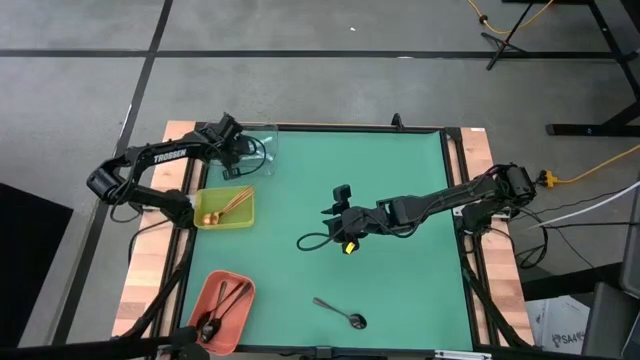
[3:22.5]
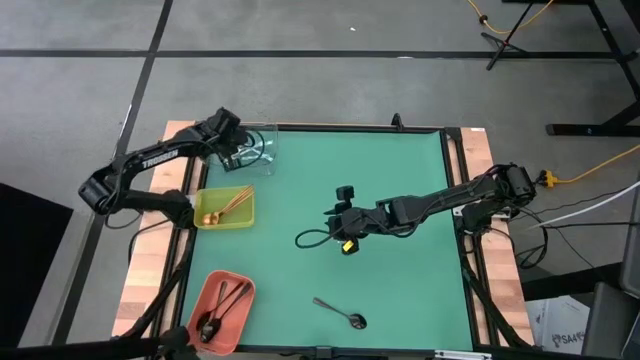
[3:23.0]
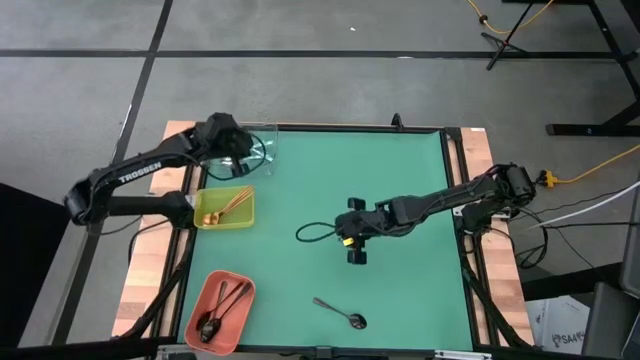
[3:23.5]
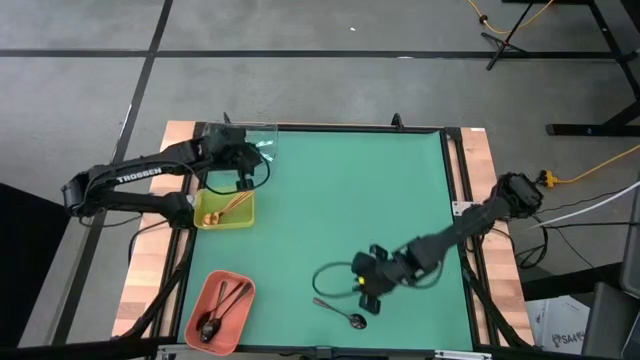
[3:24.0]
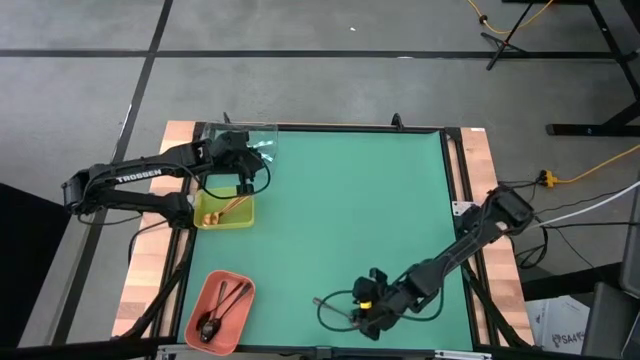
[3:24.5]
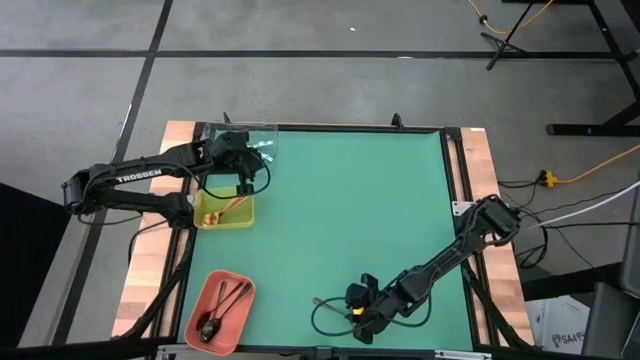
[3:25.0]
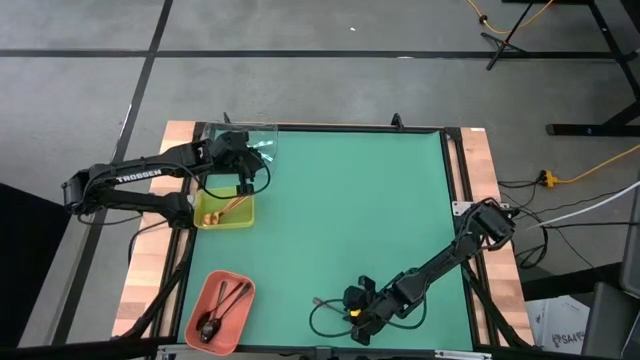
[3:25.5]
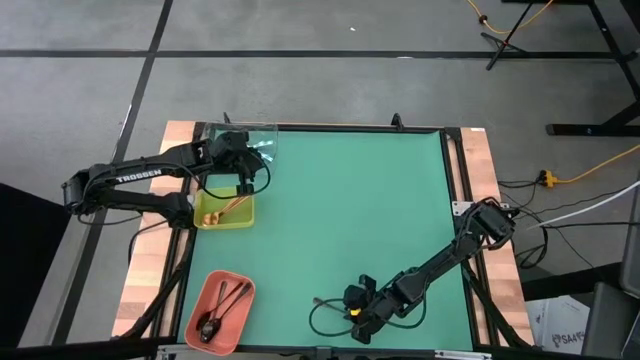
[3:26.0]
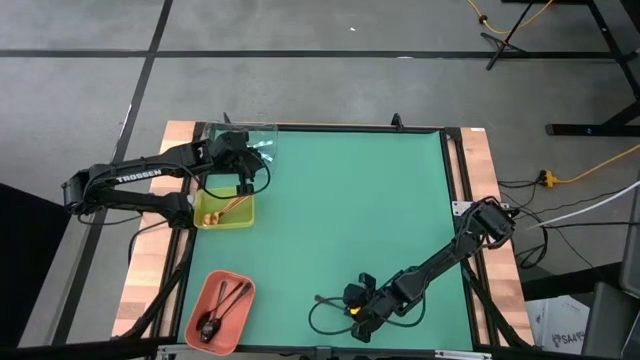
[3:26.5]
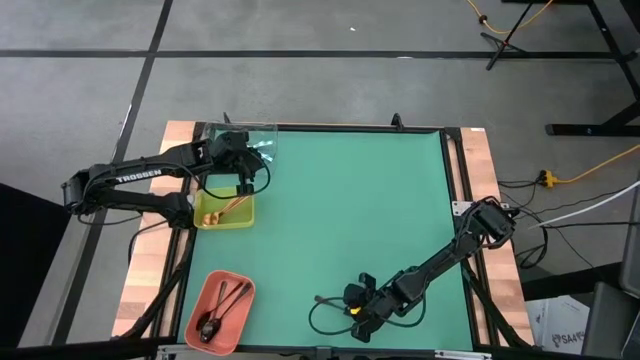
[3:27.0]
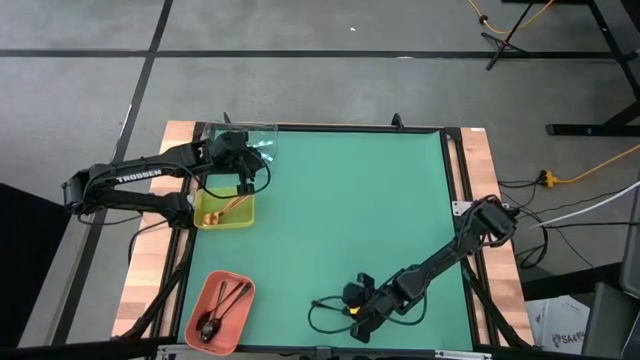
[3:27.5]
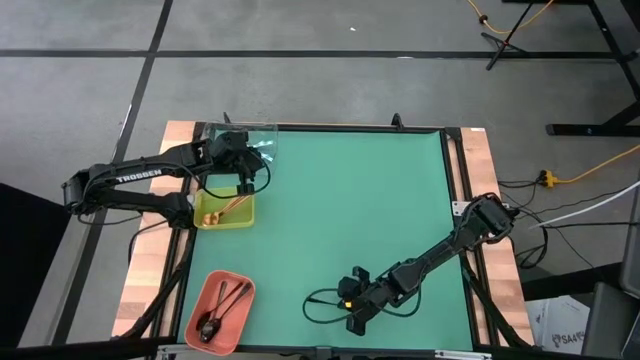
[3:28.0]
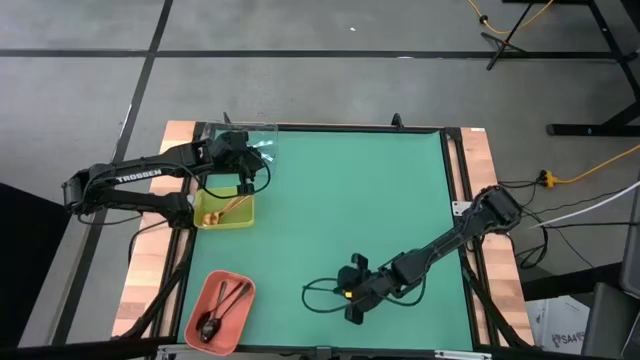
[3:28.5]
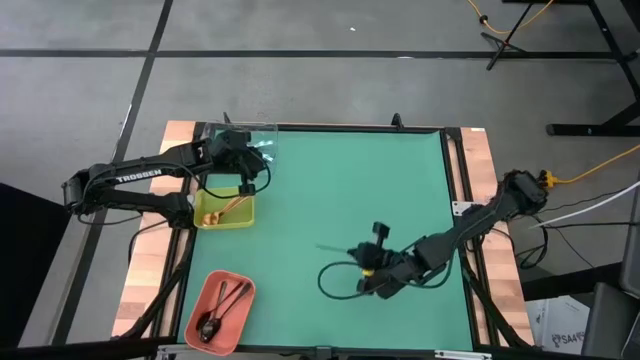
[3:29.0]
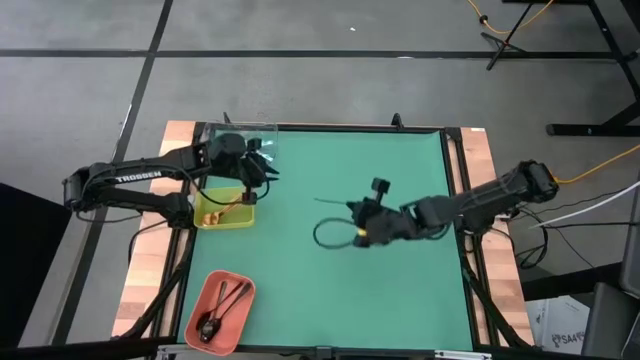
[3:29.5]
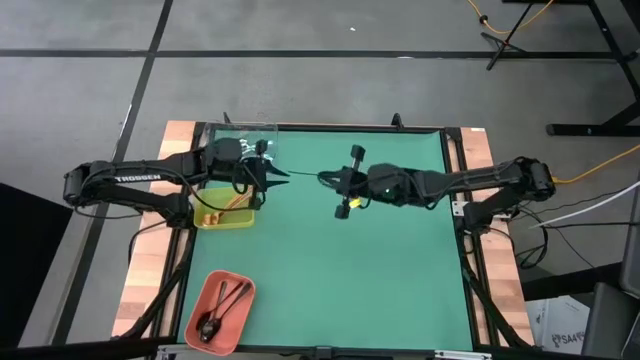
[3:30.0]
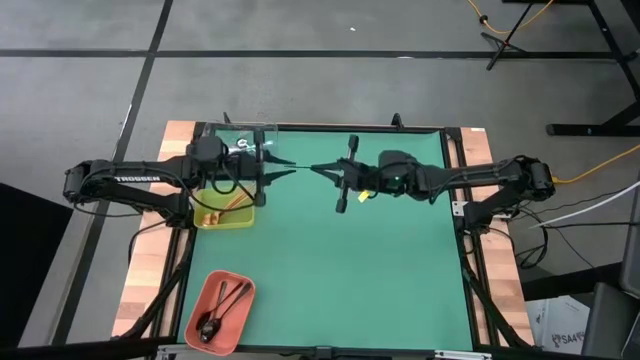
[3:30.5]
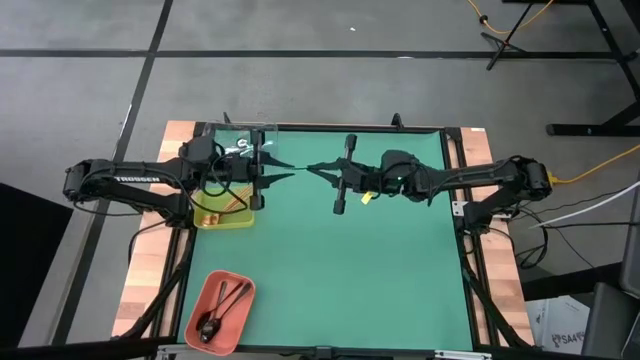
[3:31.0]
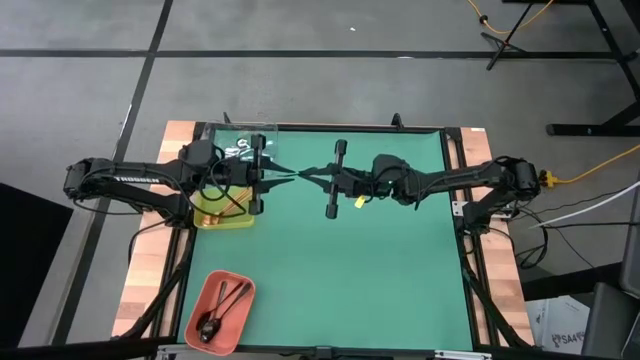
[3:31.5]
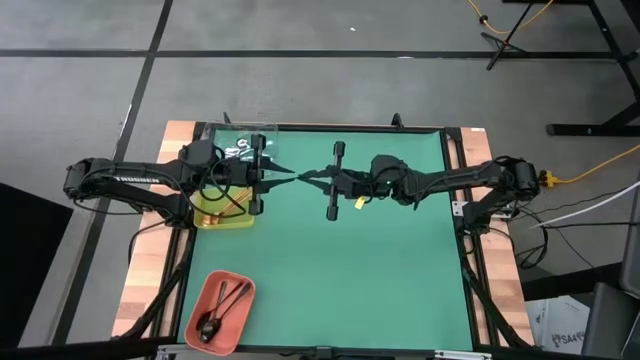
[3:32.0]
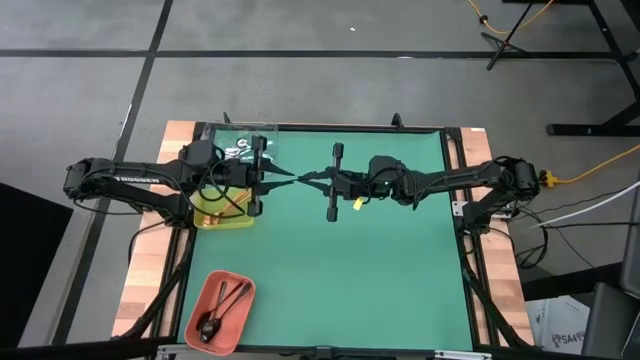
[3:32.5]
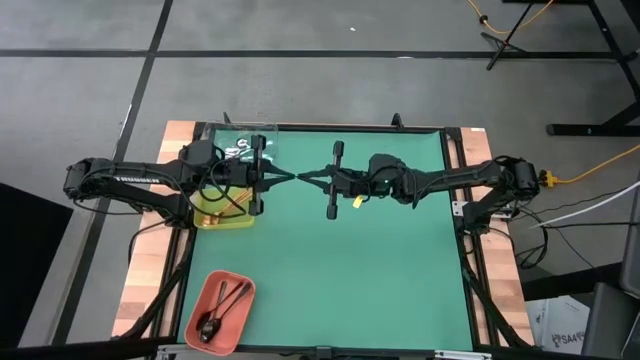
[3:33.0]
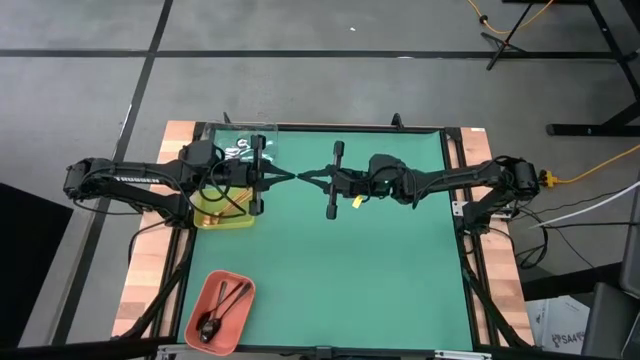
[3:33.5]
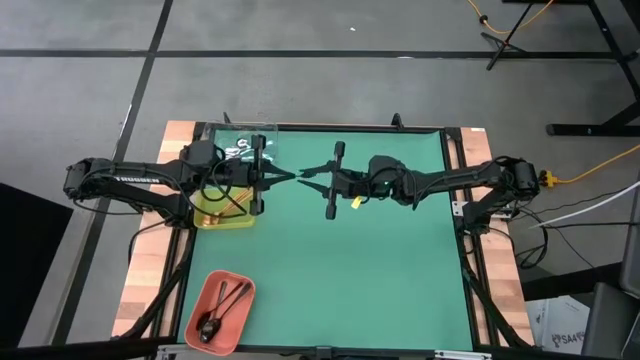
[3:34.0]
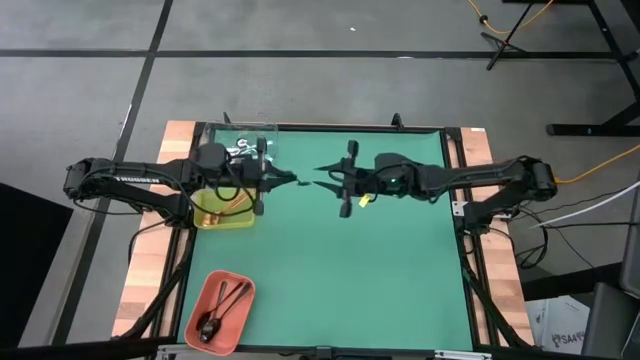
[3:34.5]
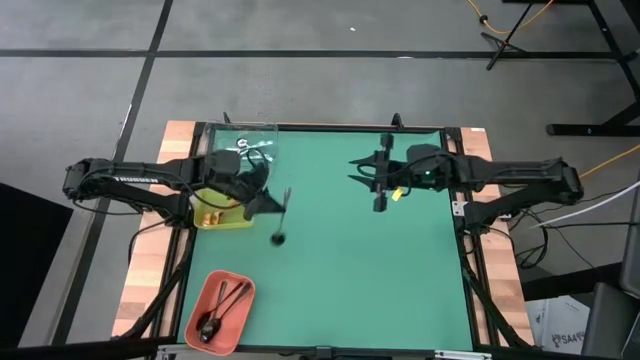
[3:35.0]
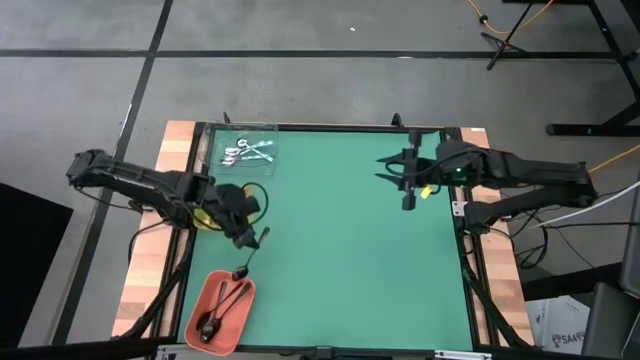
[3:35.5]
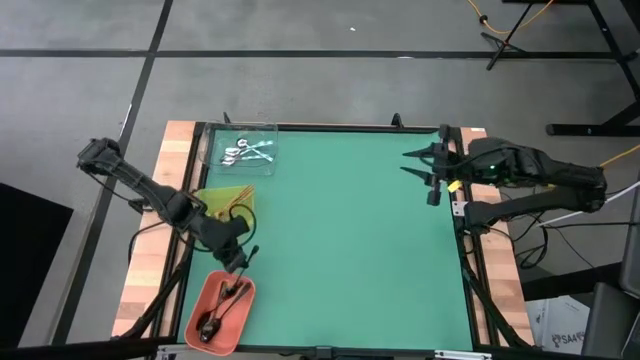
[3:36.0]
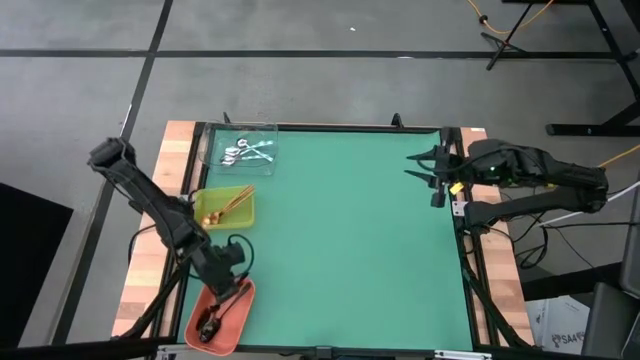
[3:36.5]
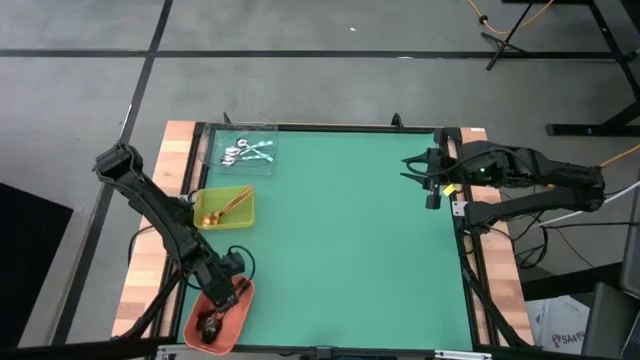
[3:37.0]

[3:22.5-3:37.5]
Task: Sort silverware by color (type)
Put the black spoon into the orange bin

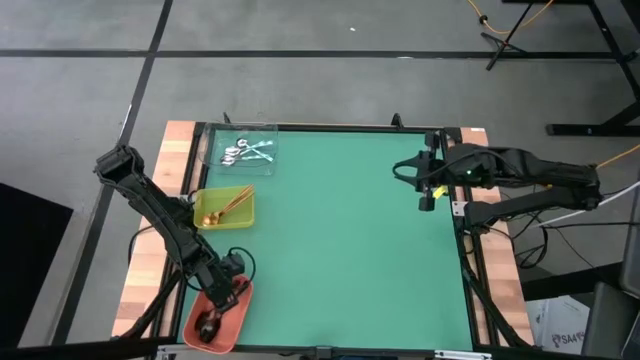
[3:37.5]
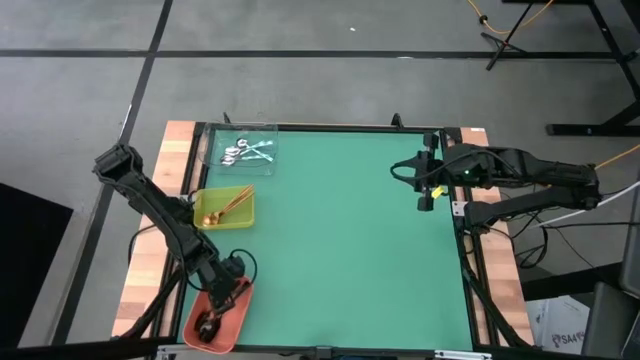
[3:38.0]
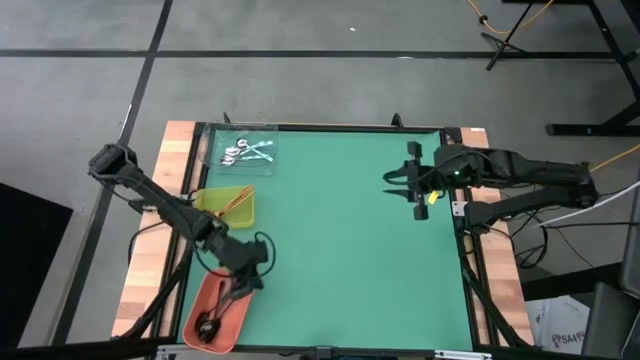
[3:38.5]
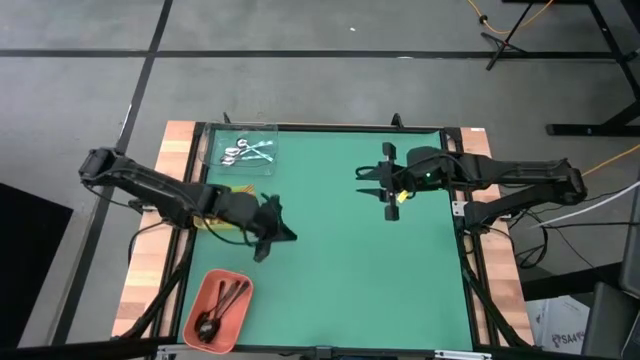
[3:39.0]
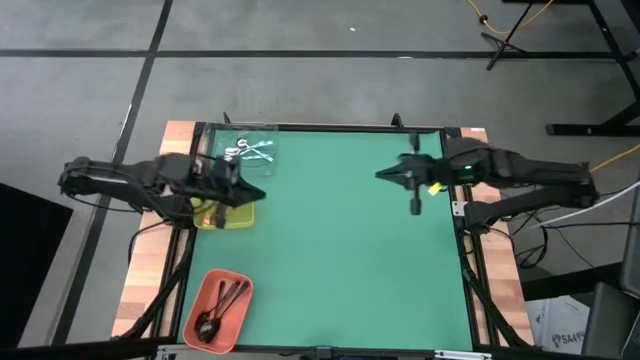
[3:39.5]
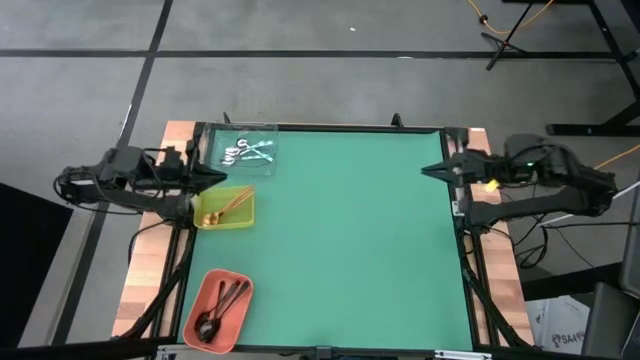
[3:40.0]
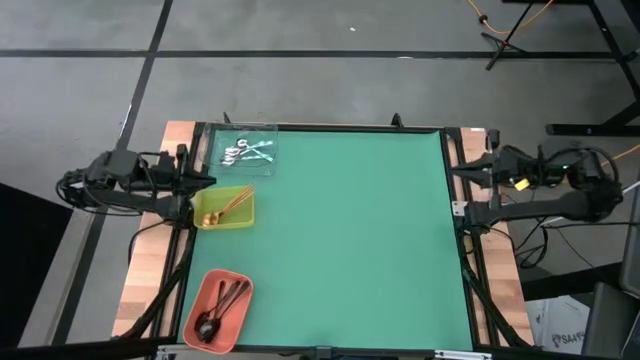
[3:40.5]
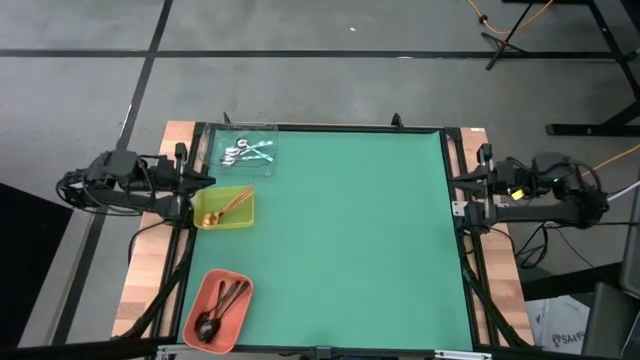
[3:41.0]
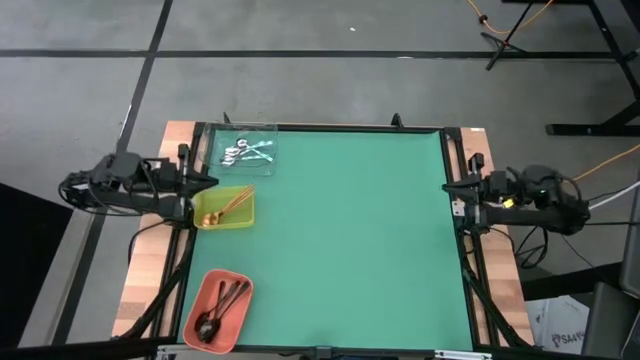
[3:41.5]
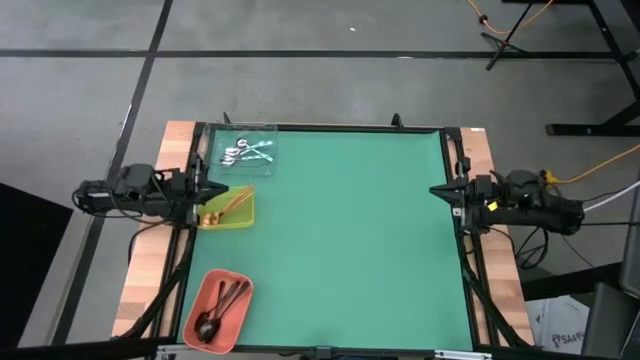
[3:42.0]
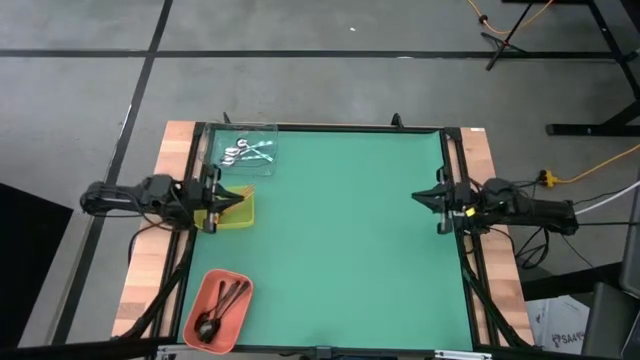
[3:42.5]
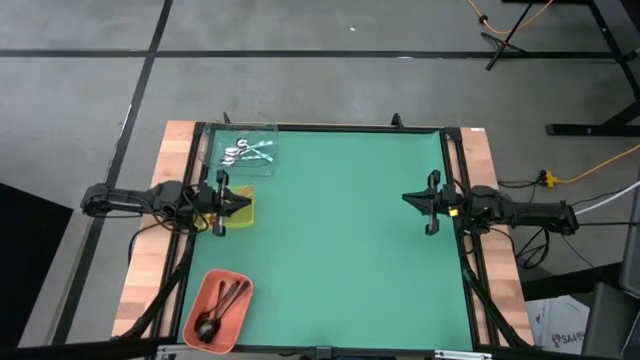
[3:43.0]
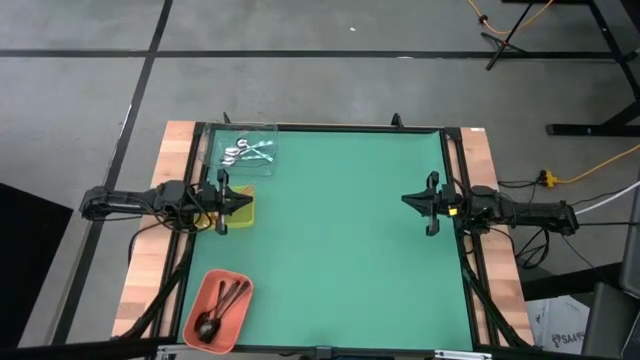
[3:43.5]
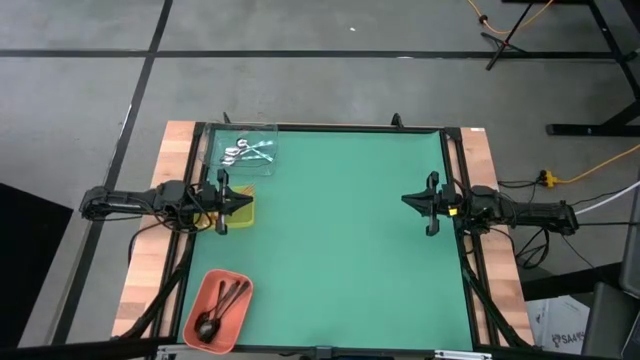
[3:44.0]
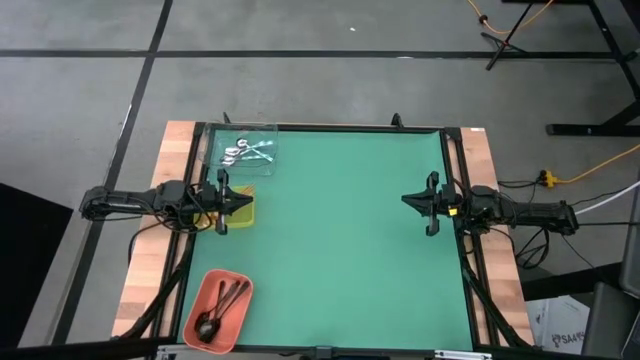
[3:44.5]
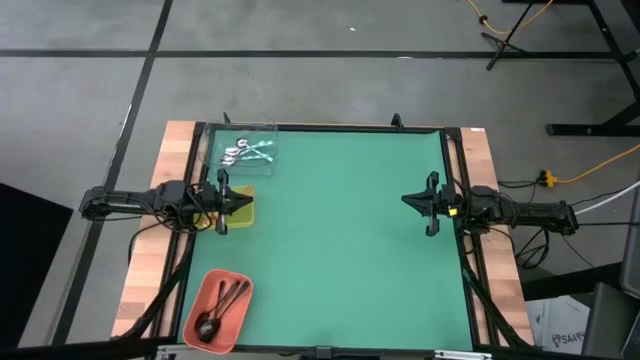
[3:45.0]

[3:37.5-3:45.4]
Return to Home Position
